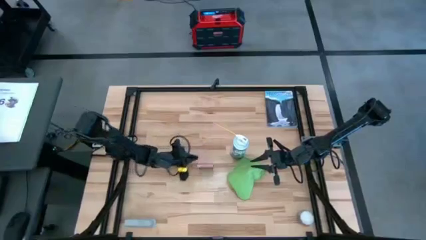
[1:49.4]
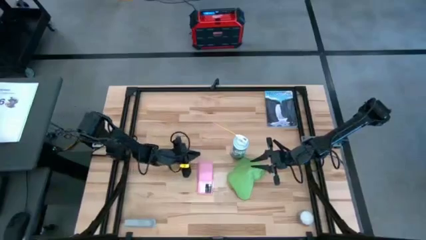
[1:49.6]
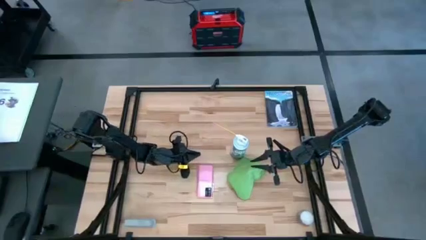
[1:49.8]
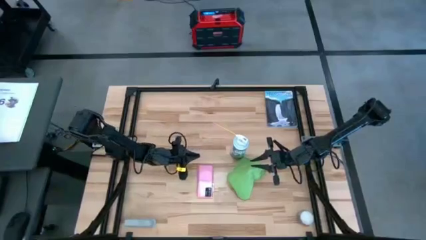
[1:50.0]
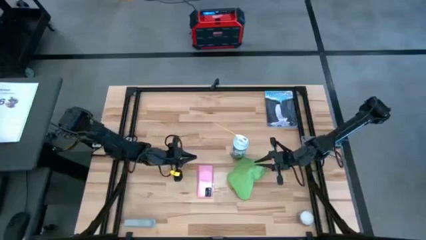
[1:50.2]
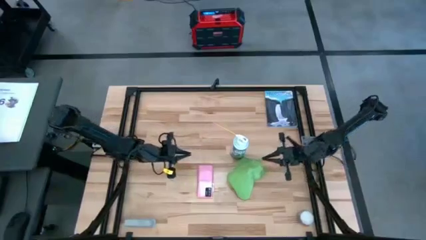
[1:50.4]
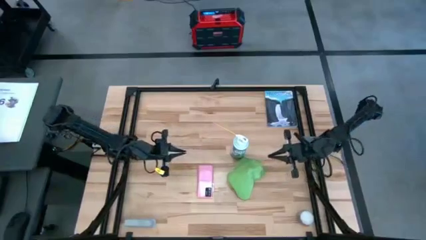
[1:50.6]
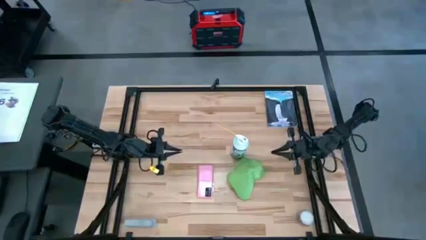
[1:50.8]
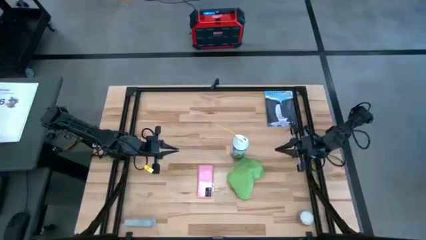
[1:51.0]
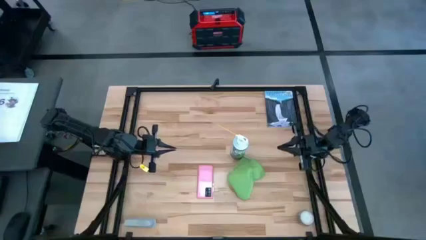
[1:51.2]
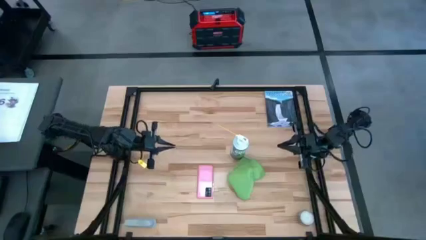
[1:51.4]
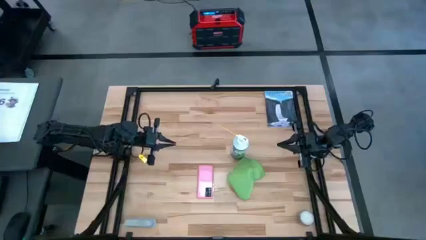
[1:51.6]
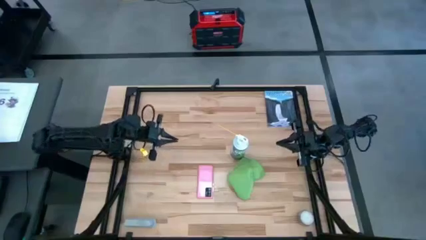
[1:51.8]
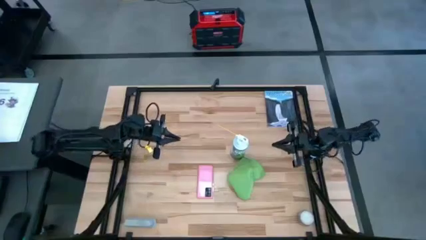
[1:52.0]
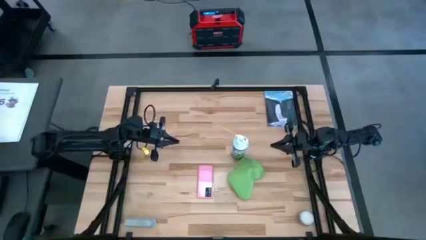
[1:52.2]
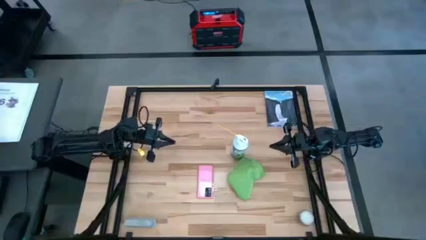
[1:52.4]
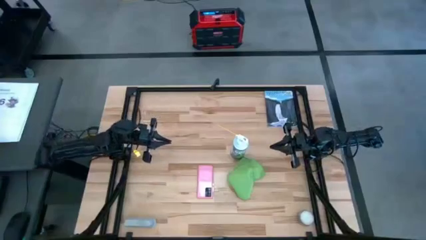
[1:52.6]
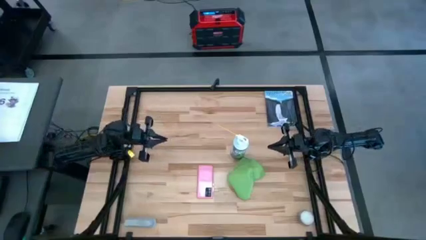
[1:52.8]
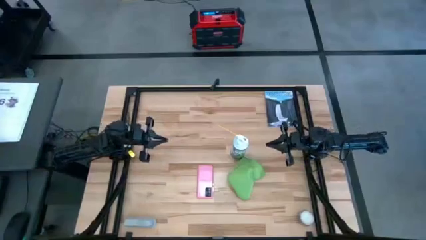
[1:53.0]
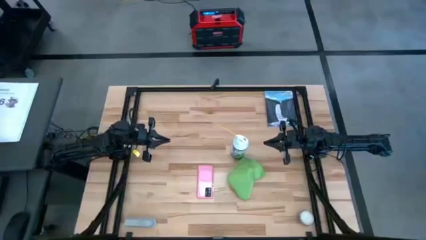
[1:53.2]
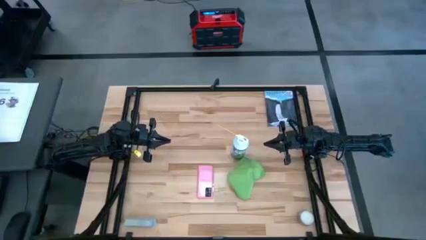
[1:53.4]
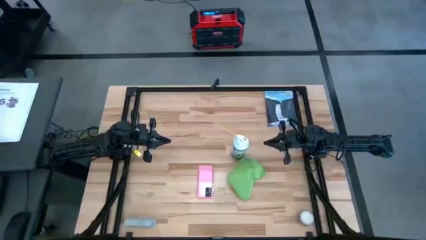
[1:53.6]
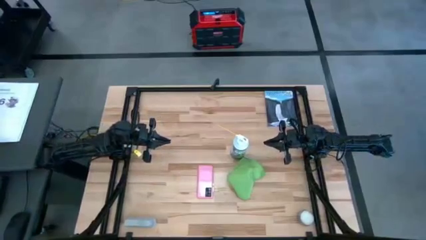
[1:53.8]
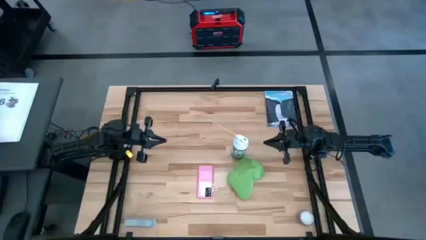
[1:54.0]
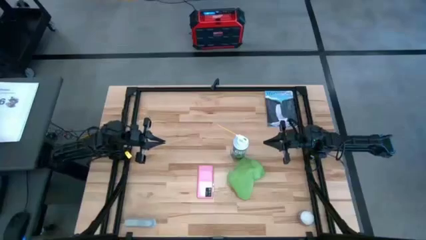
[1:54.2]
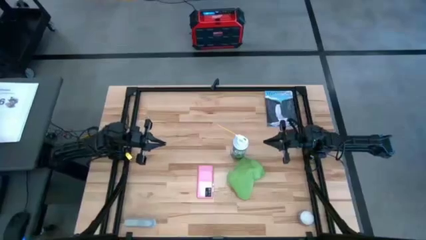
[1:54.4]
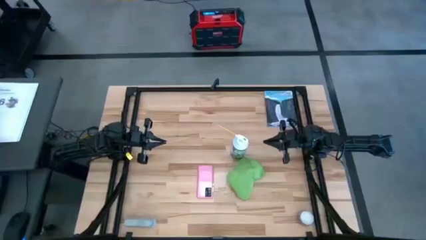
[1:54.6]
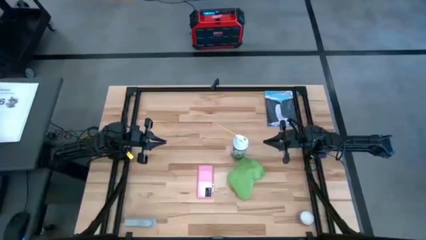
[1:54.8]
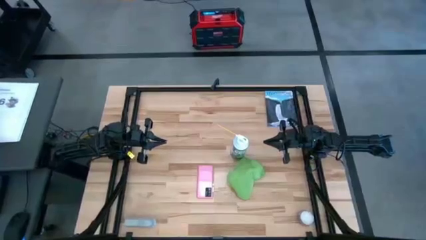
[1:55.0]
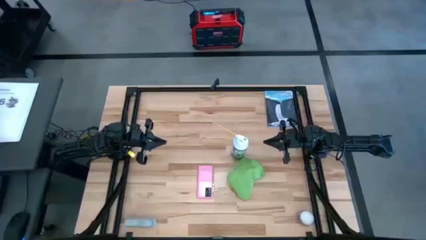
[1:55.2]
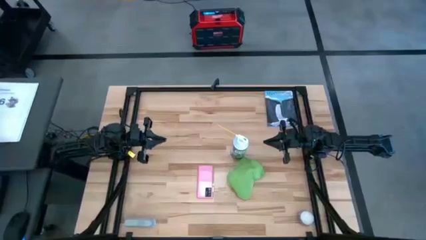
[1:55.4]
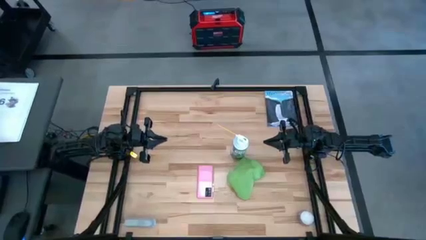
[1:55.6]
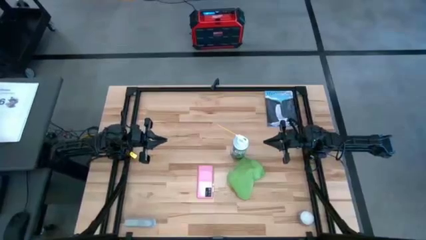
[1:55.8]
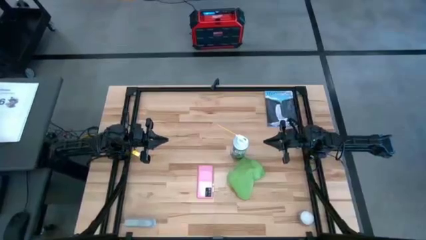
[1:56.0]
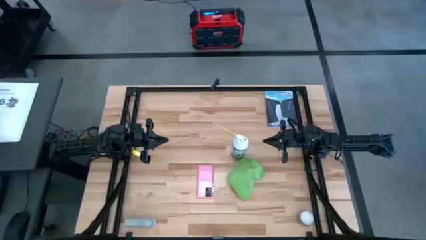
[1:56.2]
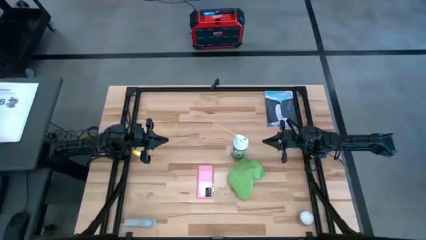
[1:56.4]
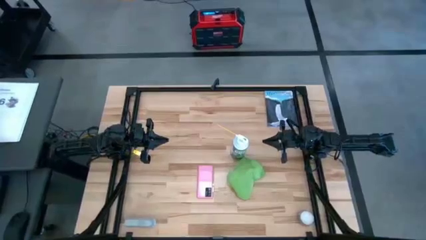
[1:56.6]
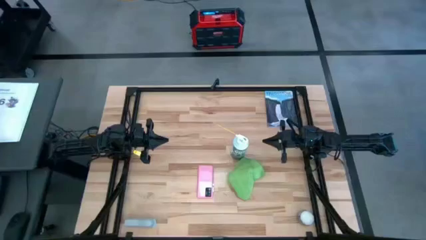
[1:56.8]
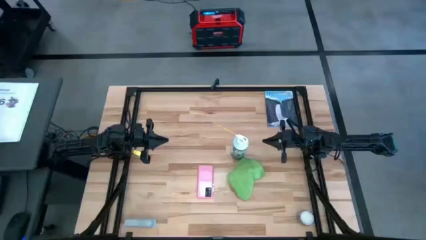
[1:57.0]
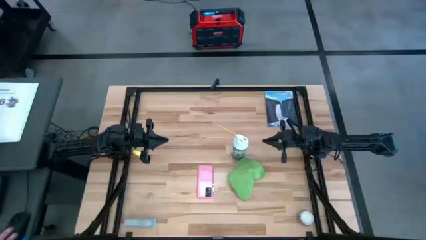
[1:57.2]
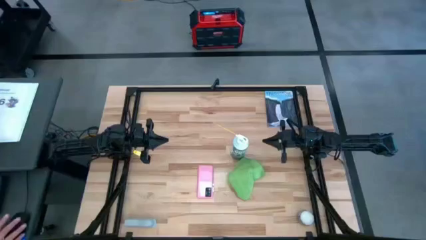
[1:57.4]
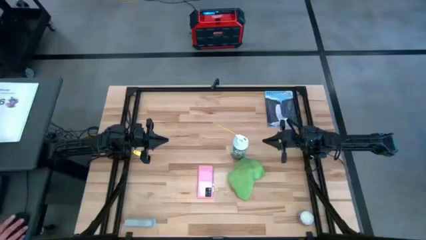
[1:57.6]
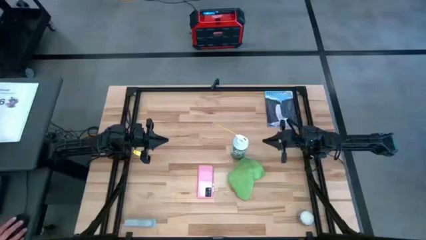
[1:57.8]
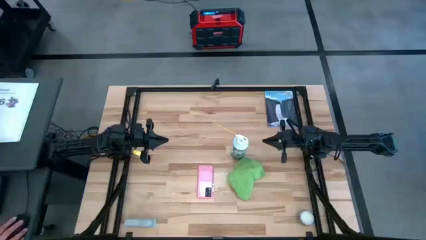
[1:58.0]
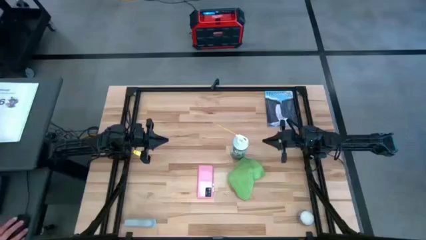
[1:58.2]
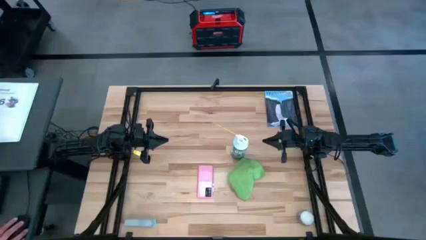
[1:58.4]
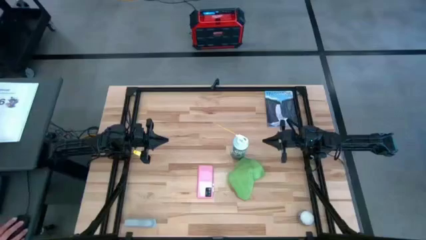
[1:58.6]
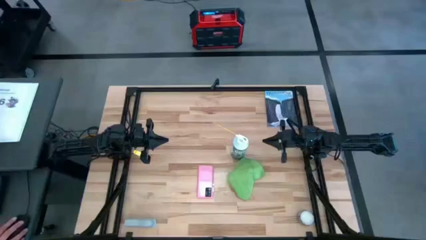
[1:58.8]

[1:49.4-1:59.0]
Task: Apply microfiber cloth
Return to Home Position

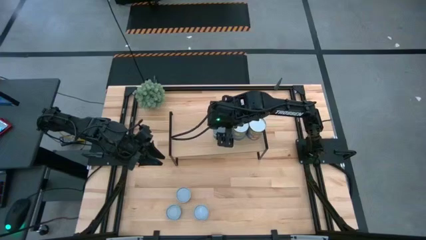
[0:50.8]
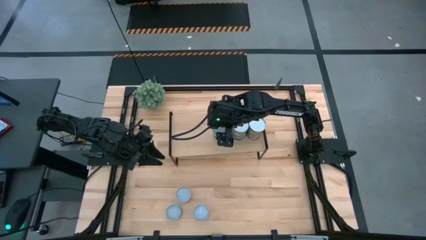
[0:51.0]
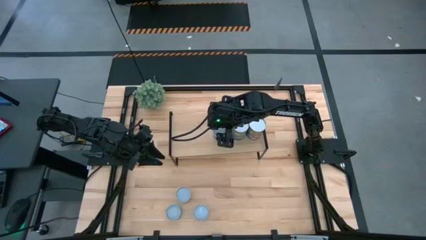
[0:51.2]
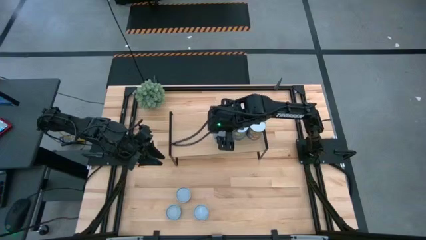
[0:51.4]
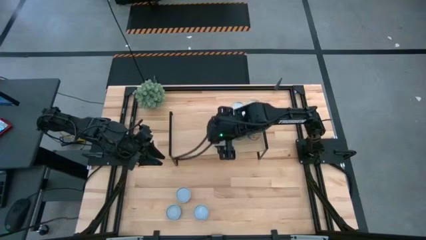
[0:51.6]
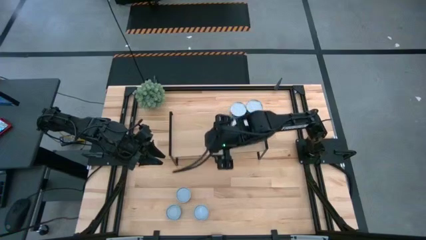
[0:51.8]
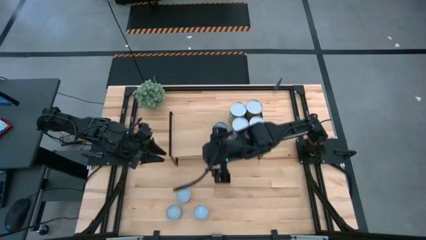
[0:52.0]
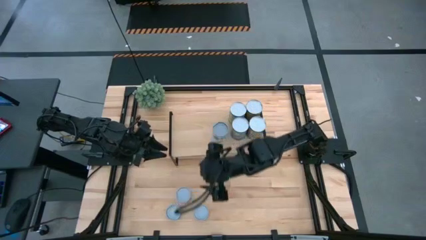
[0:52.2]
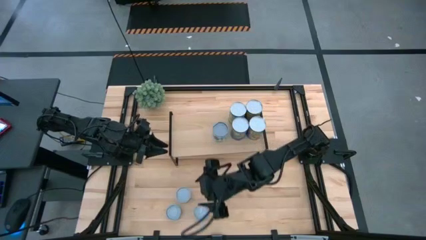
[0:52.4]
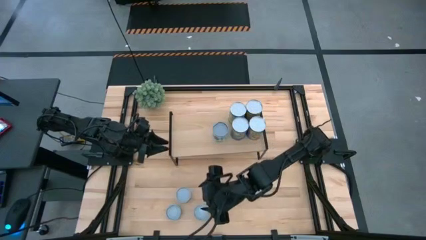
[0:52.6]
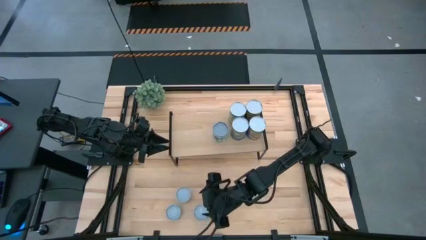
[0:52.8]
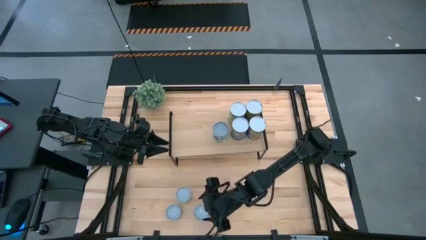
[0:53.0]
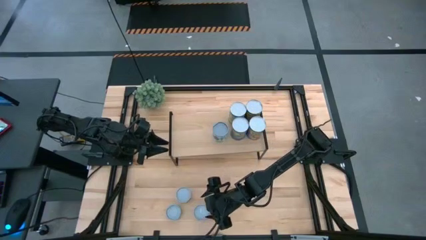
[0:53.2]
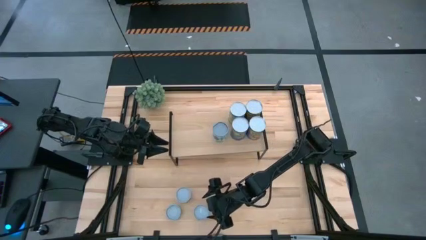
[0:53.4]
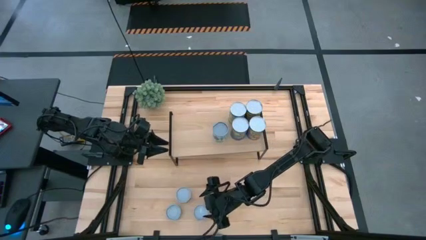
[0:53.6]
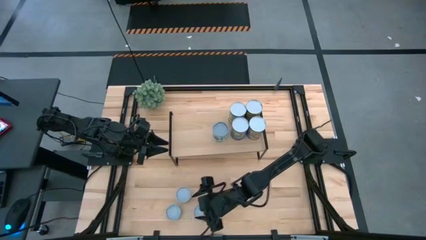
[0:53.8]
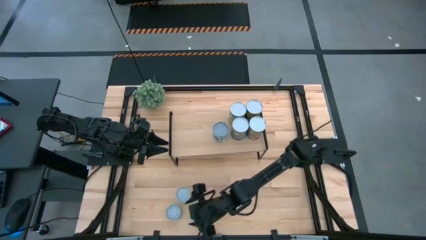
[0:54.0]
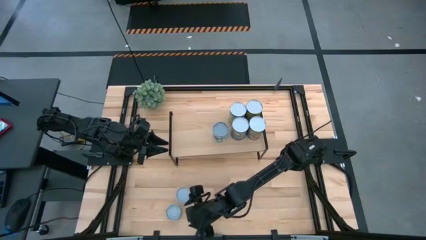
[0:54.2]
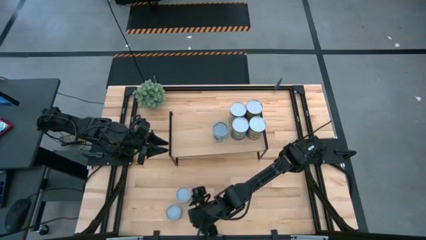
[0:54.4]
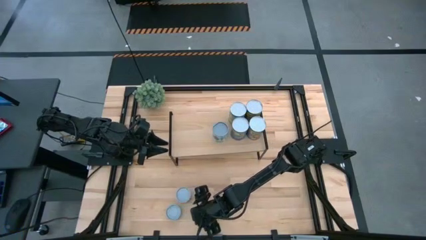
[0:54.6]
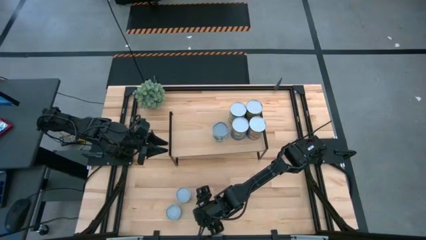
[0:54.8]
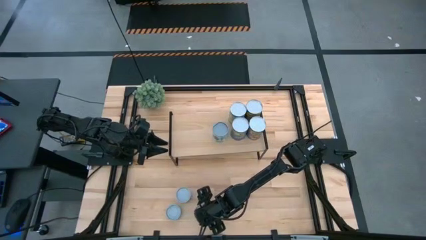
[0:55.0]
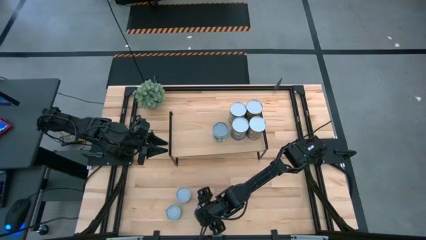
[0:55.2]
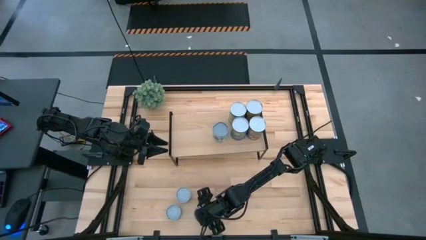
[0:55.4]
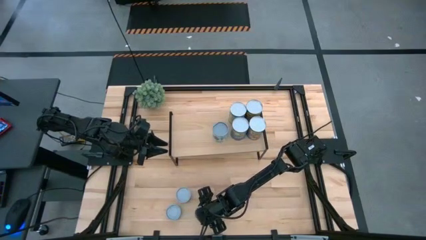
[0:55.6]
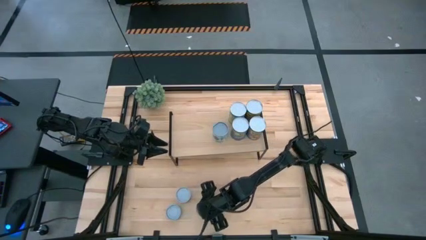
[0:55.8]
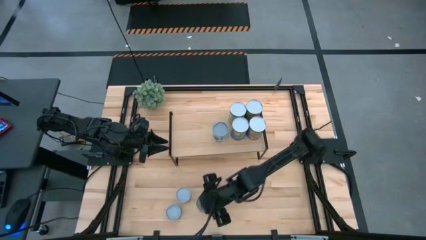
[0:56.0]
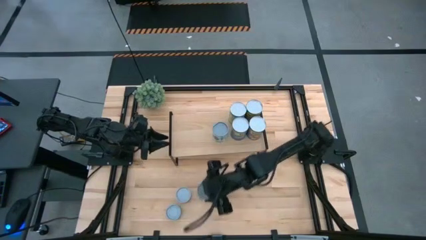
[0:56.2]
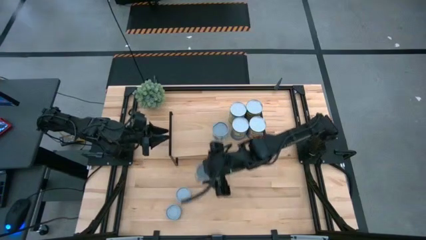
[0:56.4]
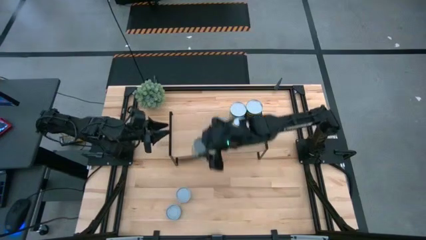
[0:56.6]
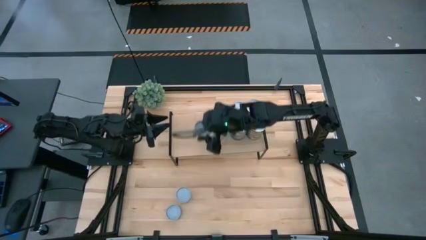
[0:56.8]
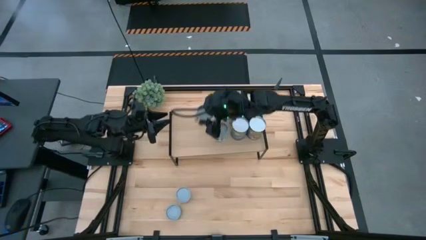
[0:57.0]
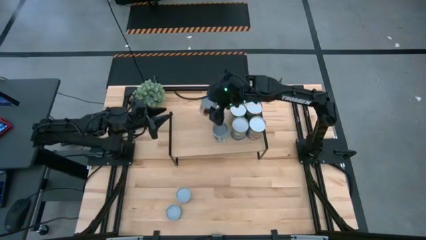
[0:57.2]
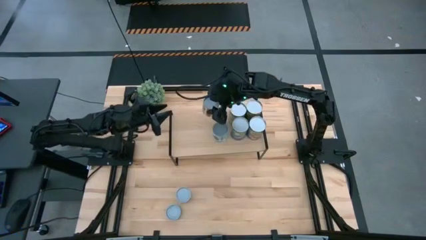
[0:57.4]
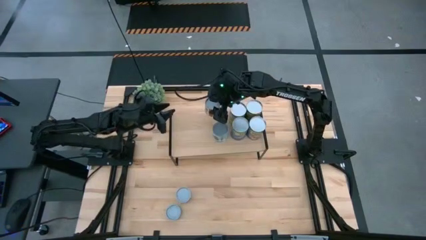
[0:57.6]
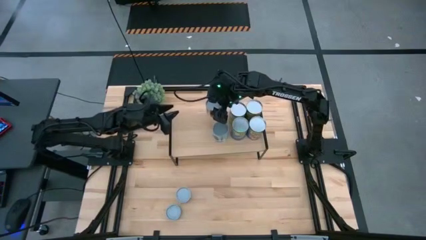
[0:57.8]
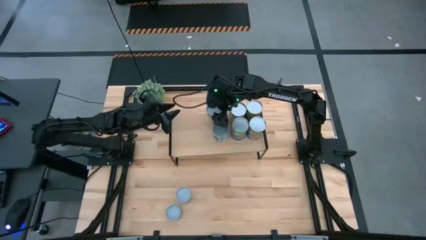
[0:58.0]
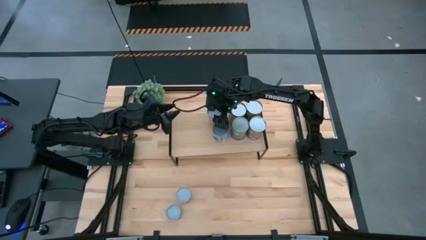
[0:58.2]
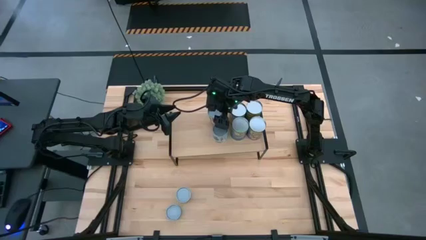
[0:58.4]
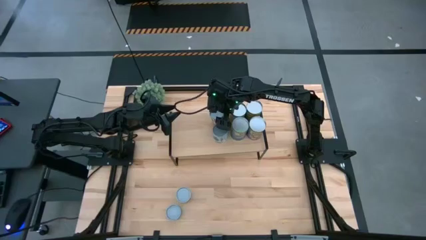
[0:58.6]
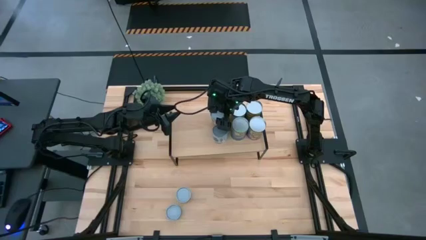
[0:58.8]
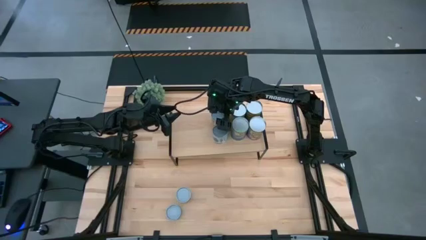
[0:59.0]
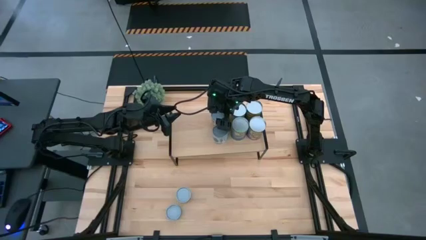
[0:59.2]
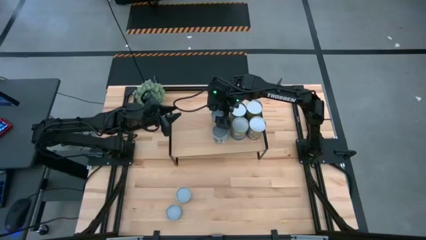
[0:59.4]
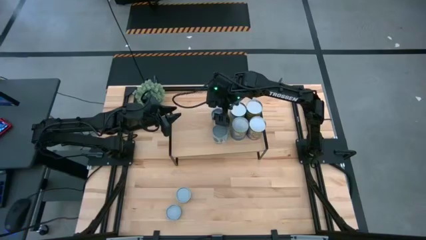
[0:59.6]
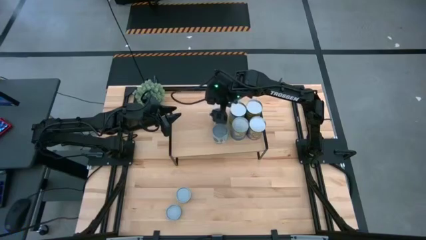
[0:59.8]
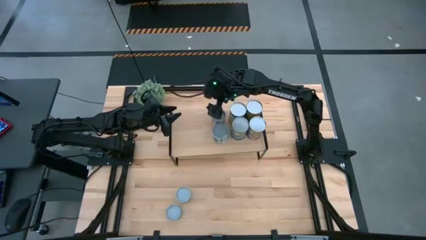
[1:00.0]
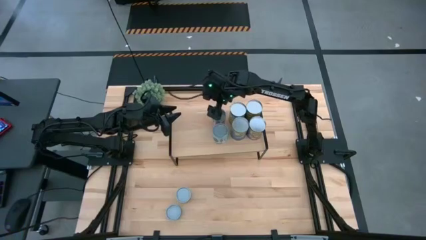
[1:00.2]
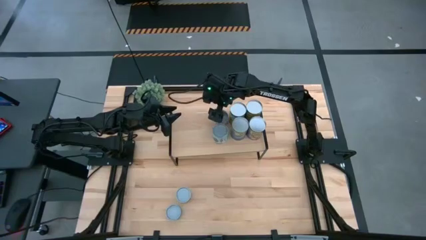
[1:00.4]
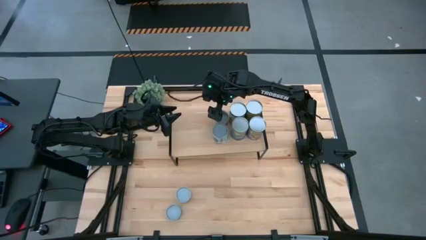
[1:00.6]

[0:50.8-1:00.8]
Task: Pick and place cans onto a shelf
Put the red can on the shelf aligned with the white can
